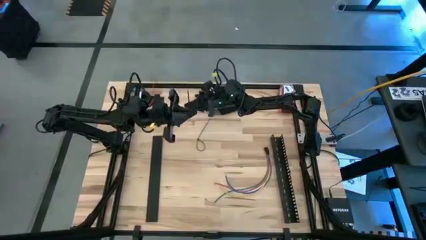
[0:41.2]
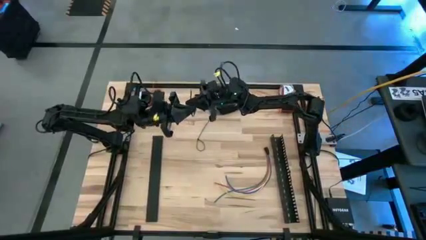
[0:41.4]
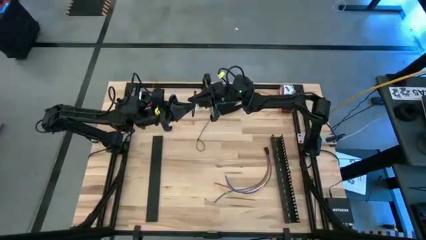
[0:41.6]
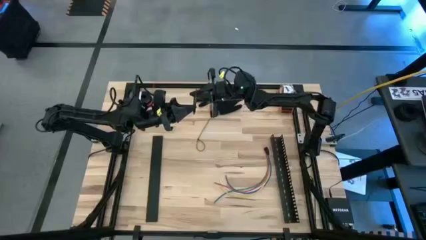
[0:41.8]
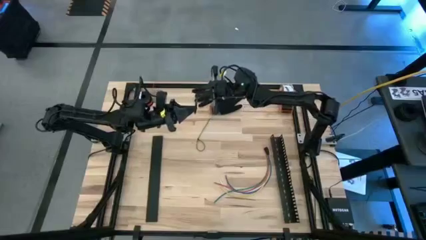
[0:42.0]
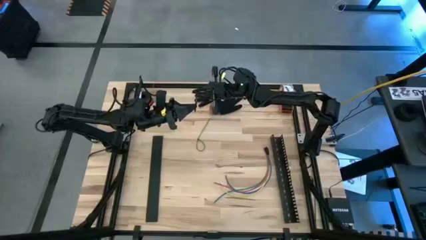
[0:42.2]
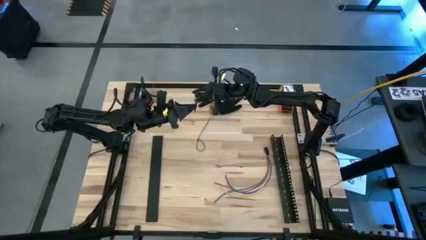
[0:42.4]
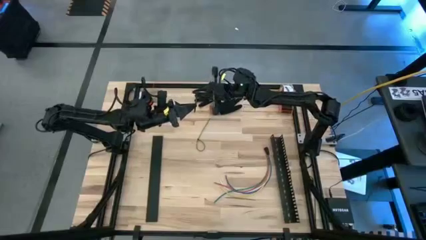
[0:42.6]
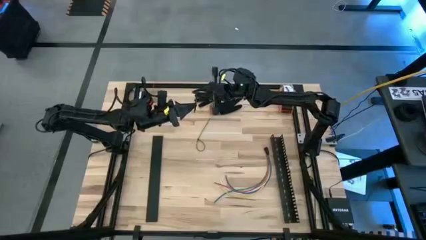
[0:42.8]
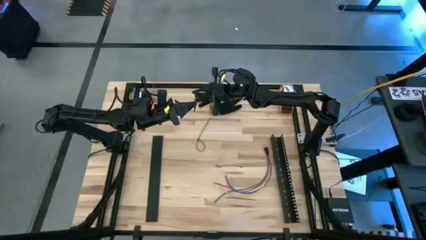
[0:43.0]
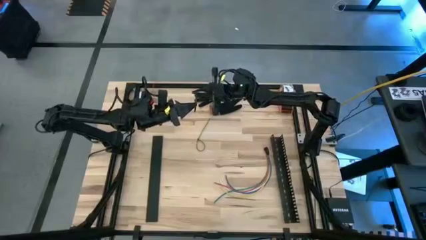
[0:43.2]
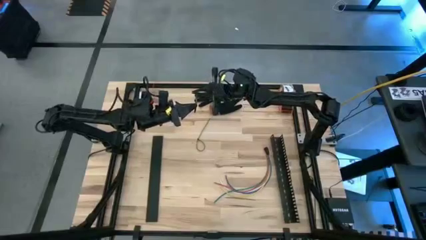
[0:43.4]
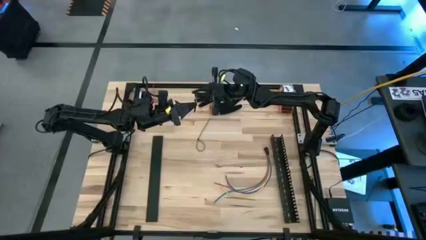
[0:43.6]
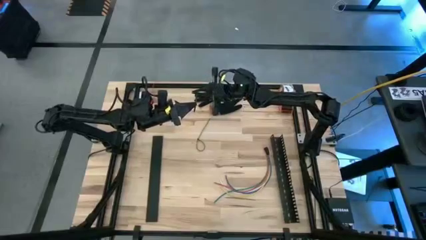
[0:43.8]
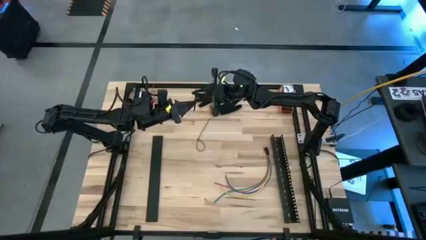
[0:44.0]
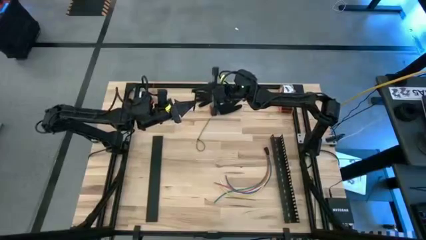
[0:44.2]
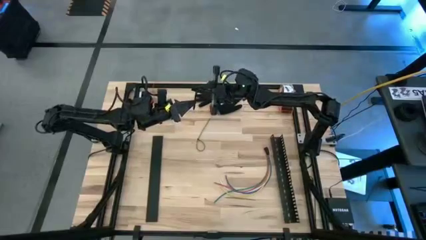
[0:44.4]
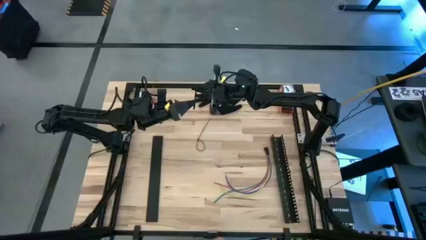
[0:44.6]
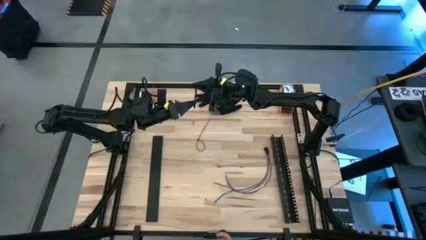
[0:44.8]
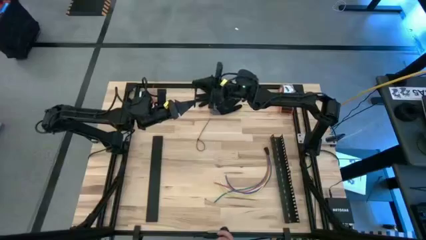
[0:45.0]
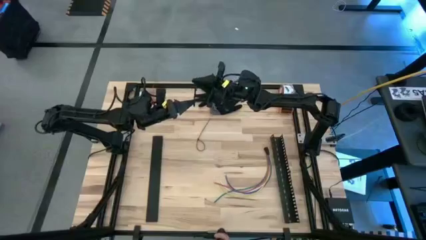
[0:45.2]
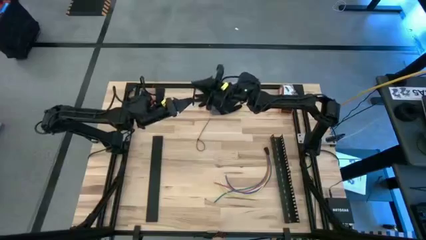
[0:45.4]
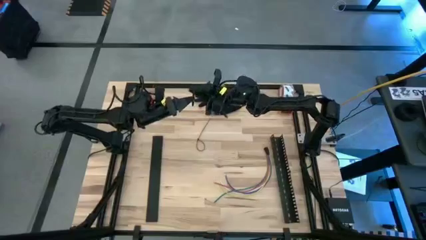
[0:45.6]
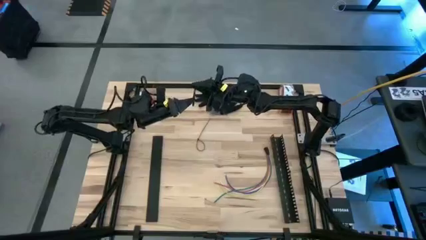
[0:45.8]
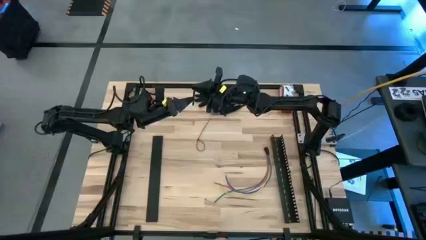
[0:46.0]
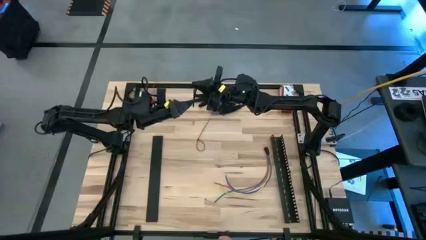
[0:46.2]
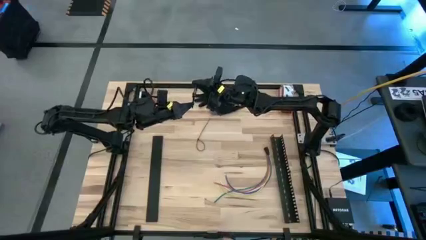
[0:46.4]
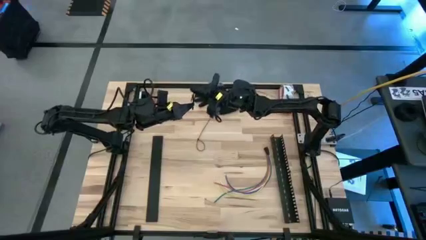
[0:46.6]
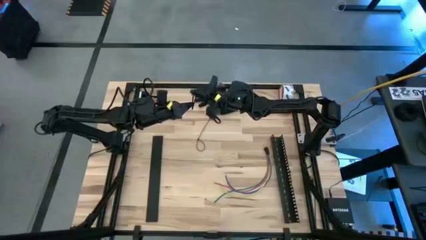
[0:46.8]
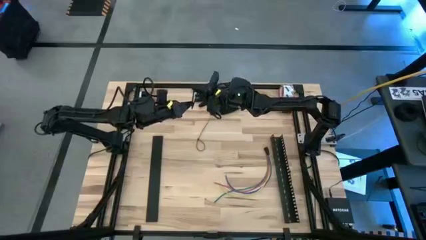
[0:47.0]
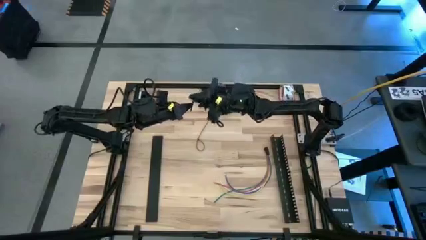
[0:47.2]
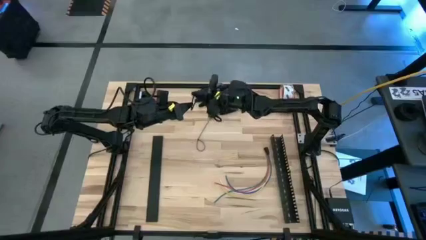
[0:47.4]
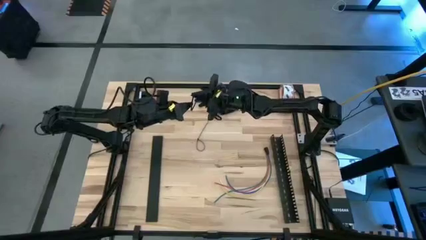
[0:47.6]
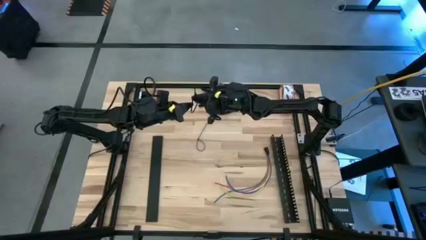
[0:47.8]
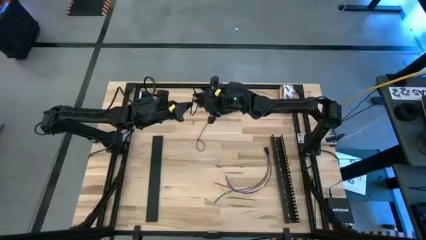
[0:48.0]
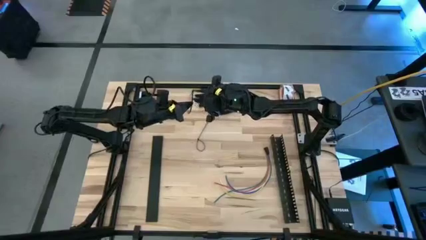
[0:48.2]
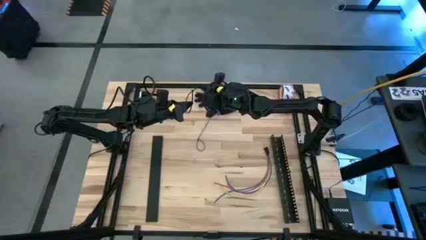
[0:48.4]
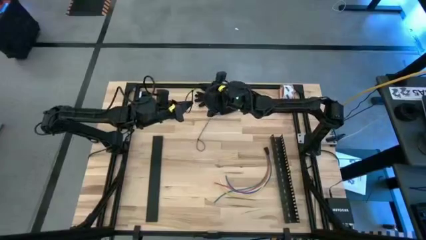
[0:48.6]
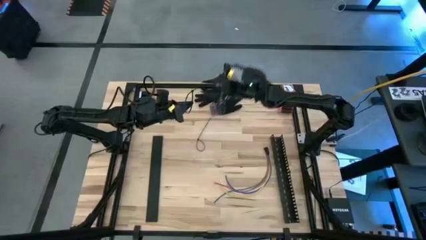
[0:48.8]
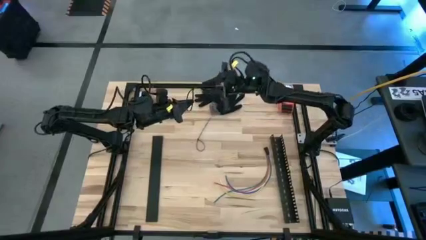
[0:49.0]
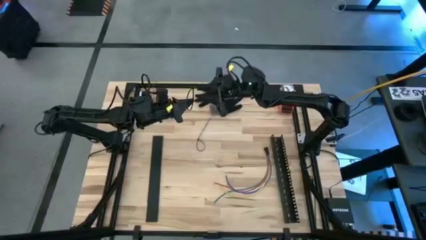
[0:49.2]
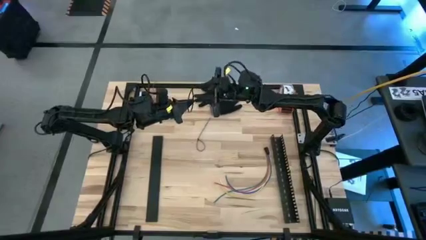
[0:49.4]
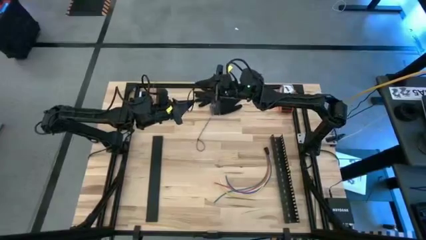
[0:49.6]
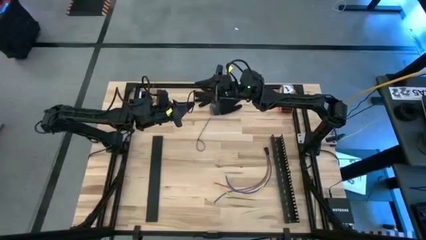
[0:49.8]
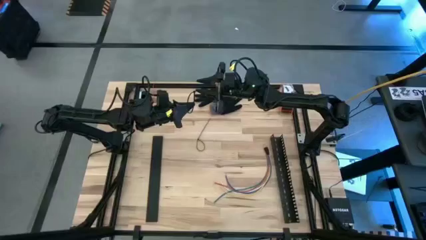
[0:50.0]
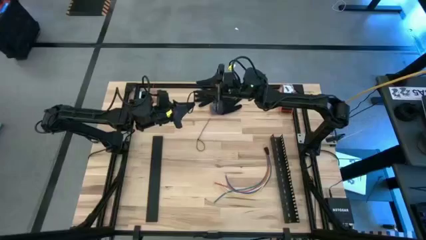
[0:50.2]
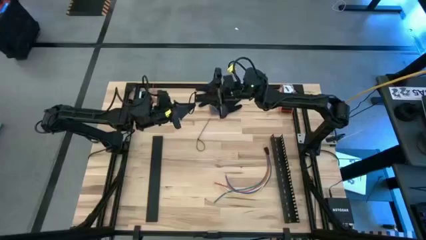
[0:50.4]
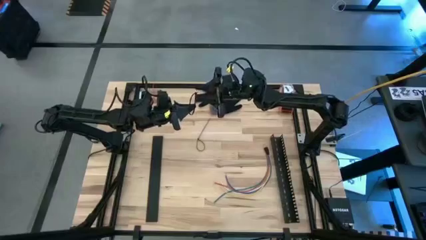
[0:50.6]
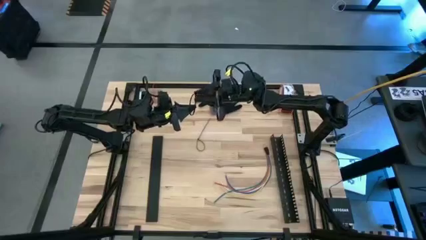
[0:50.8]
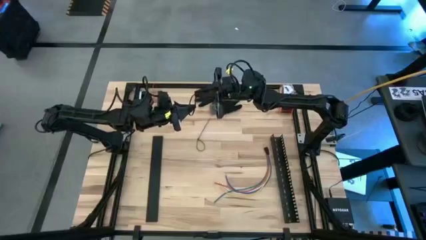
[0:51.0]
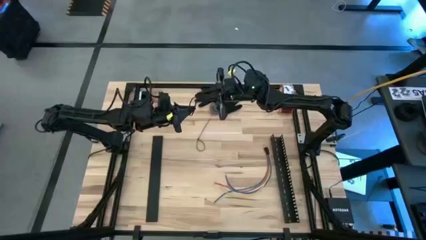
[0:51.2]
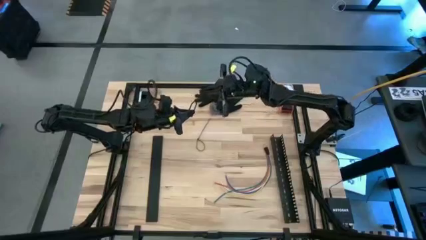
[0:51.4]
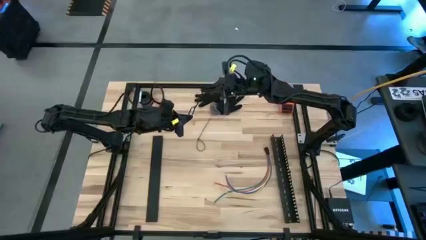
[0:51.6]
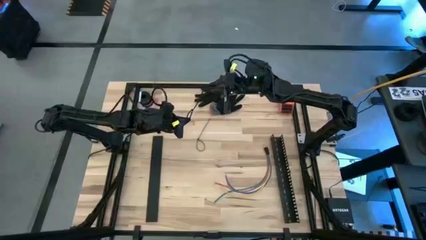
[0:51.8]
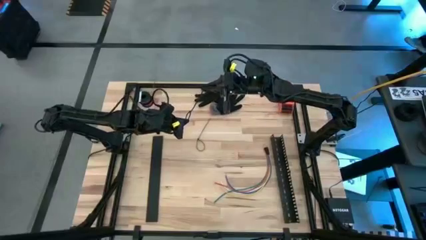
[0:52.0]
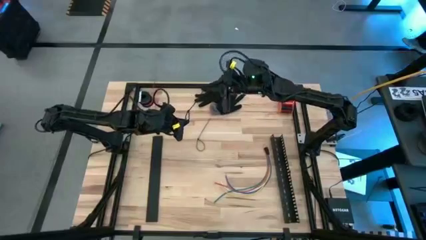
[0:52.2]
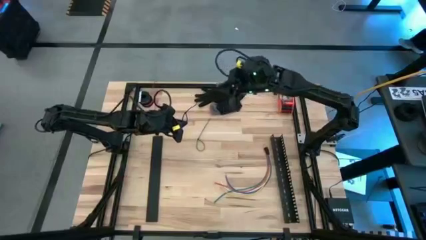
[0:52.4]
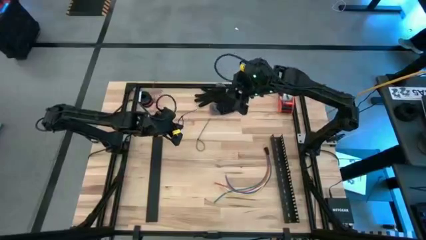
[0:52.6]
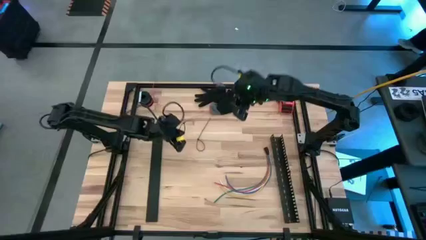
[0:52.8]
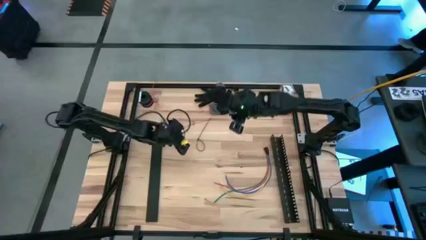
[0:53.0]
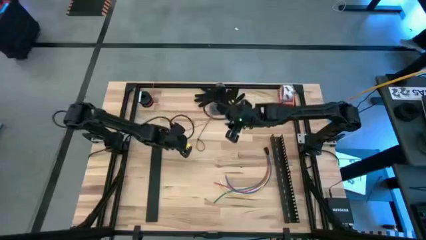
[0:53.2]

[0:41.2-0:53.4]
Task: Ziptie cables
Insert the black zip tie into the locking head

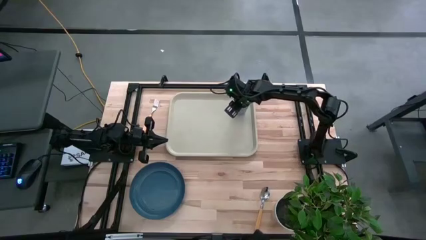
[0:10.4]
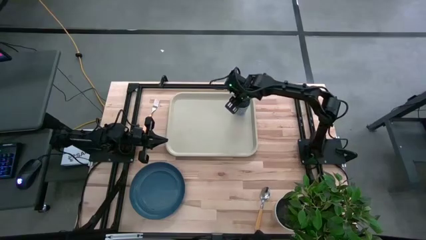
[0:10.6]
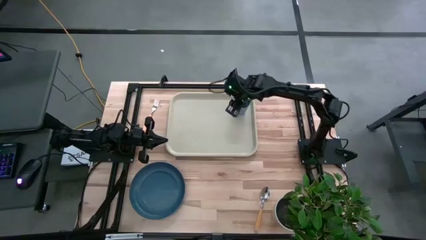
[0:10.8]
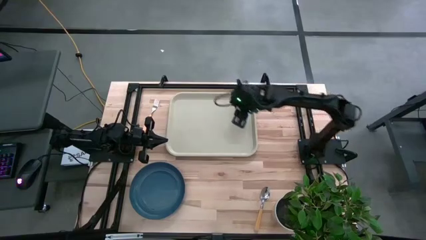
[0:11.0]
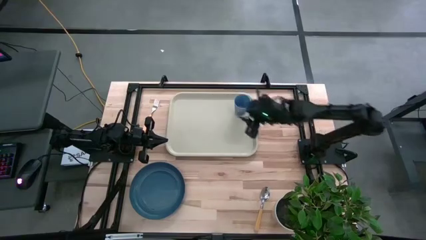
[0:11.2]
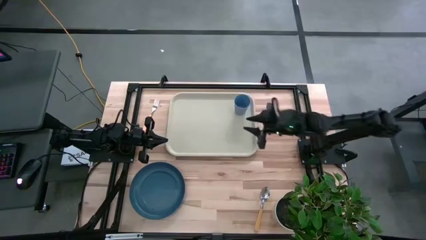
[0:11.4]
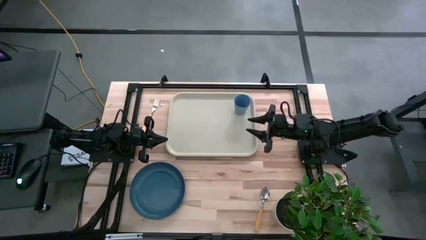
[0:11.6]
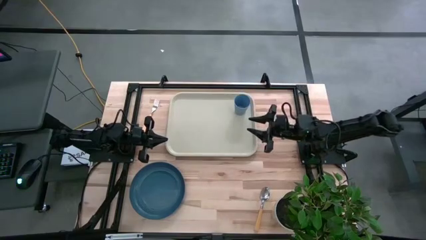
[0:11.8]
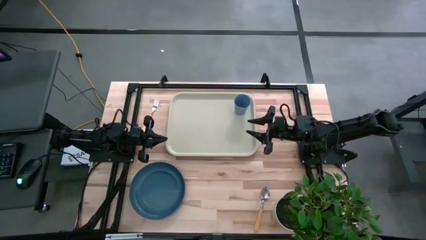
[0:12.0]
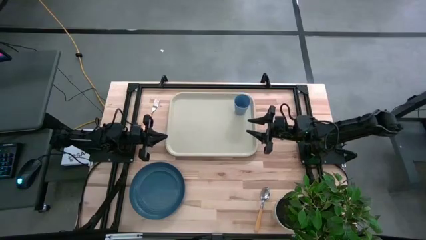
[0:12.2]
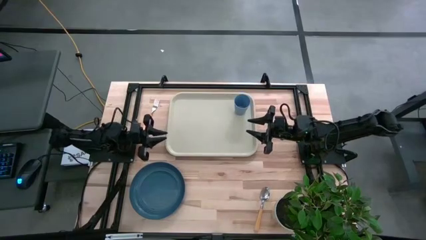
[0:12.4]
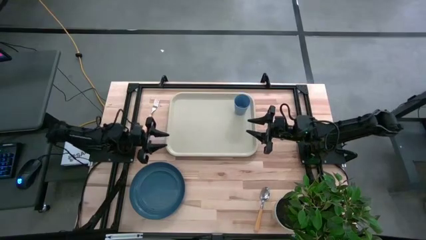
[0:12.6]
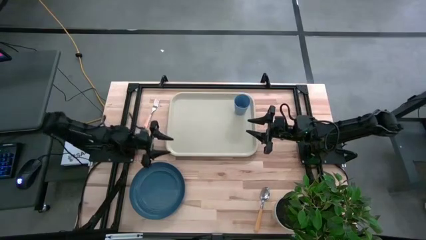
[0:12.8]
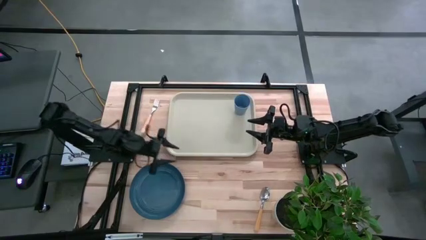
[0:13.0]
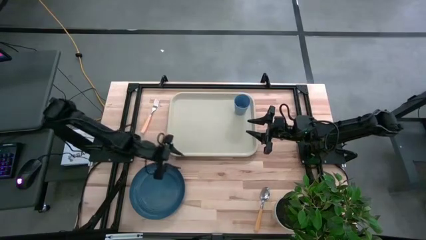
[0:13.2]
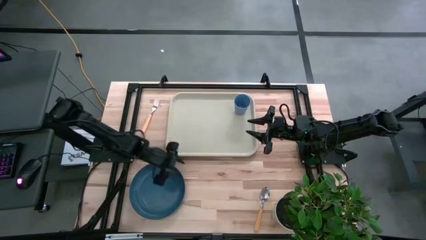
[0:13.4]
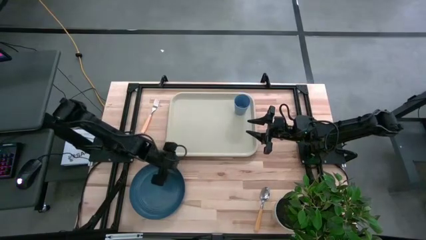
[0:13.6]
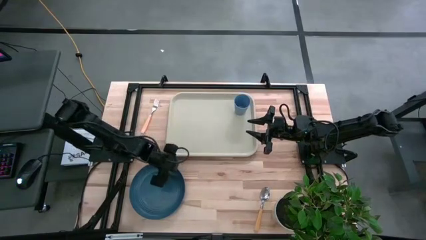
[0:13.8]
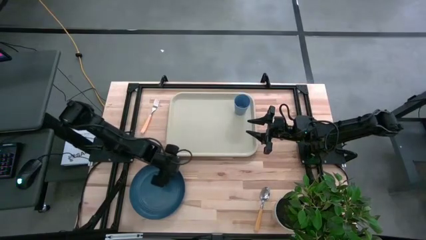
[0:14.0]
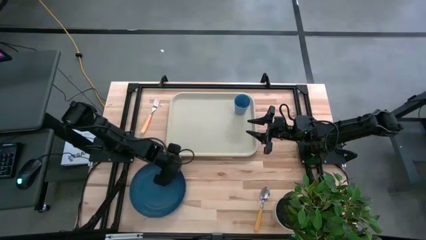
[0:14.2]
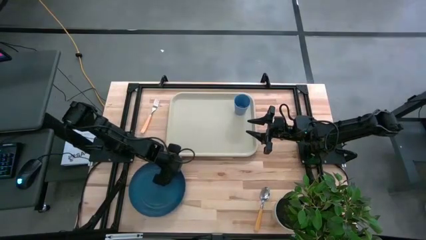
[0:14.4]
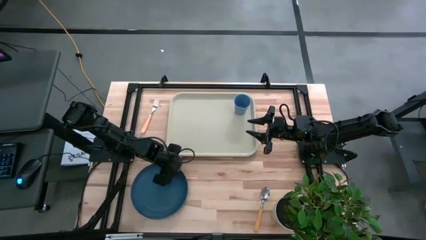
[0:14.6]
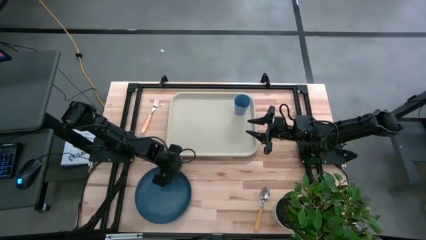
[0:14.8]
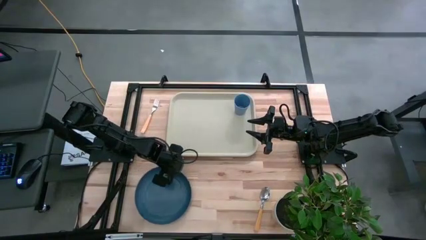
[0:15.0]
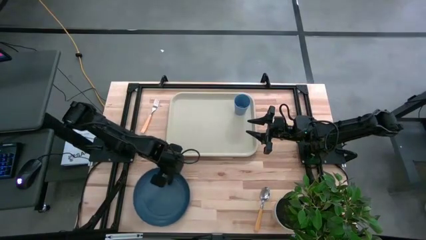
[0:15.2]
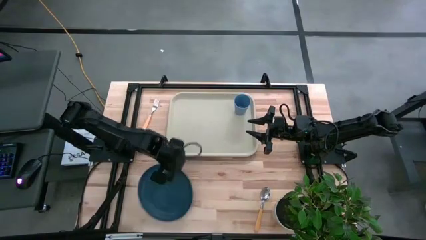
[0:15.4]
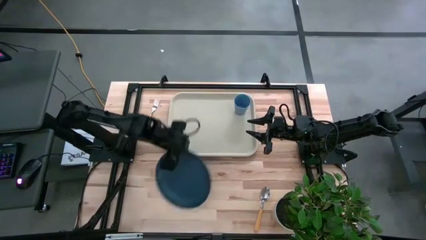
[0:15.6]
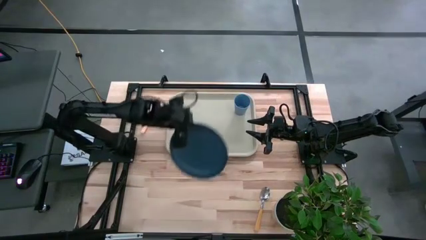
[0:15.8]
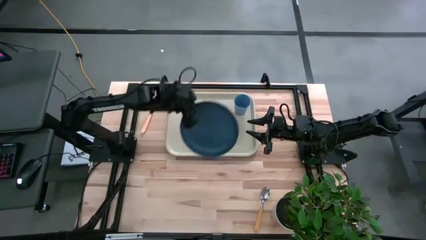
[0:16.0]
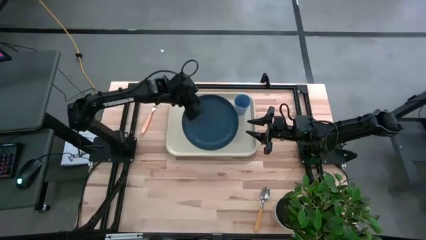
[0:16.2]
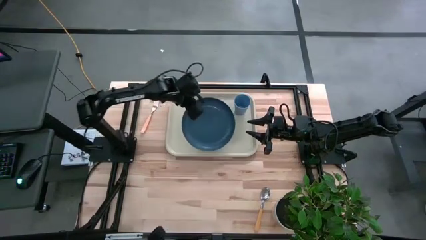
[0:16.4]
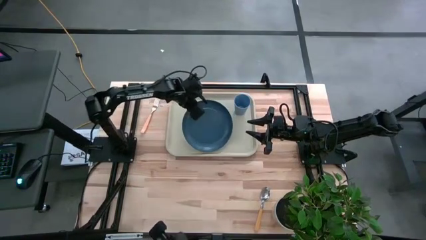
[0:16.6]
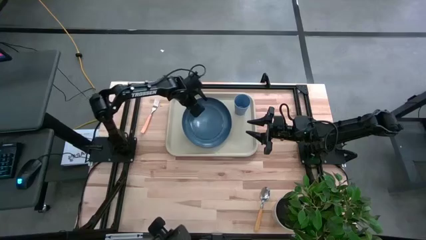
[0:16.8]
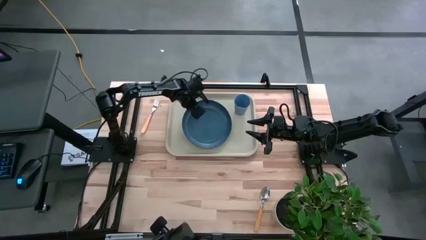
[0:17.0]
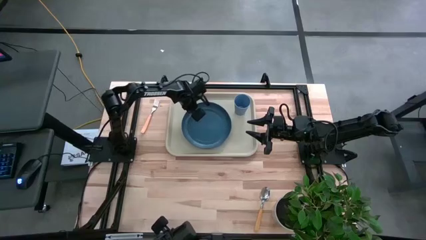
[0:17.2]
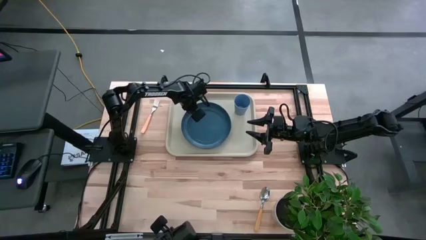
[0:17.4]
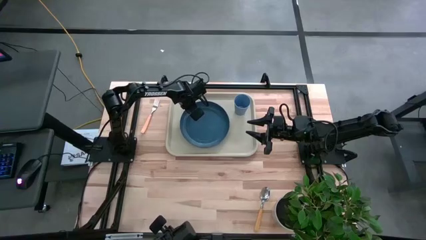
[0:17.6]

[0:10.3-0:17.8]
Task: Pick and place plate/cup/fork/spoon on tray
Put the blue plate on the white tray at the bottom left of the blue glass
